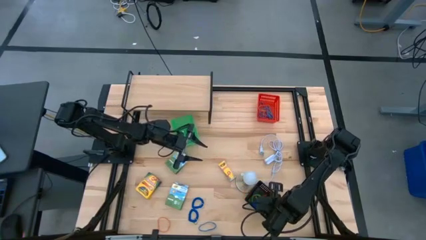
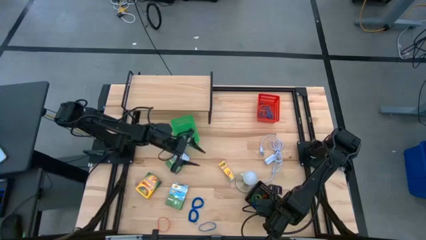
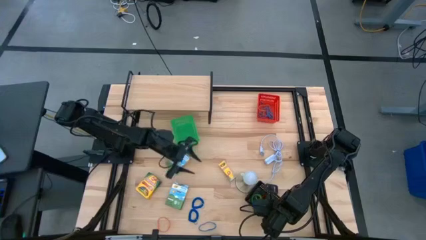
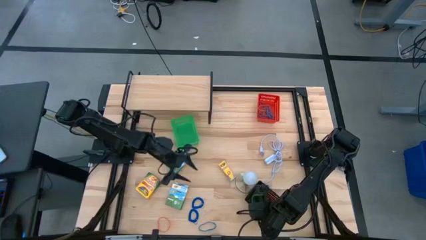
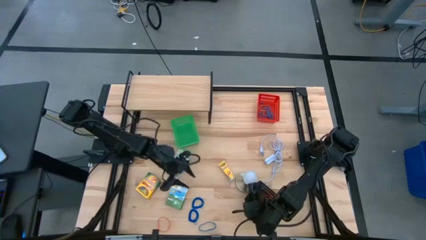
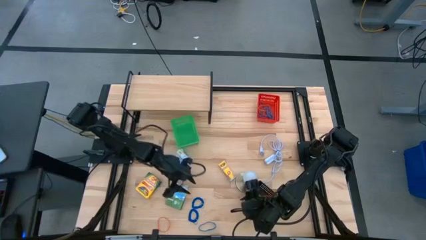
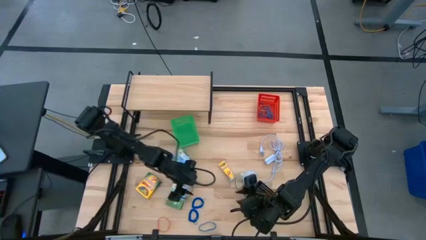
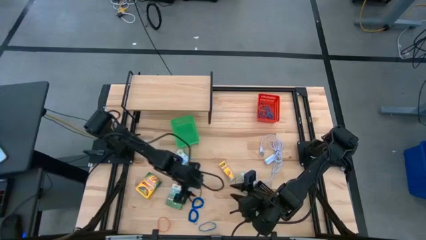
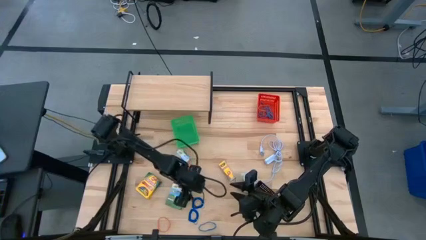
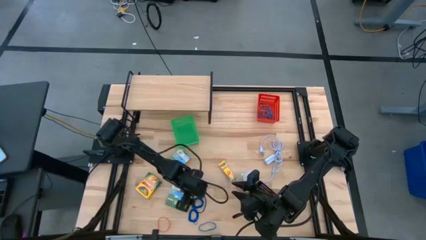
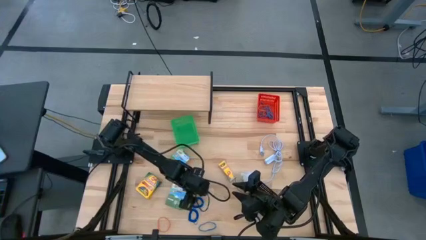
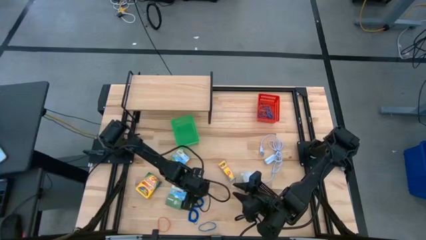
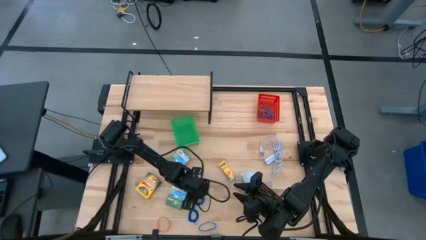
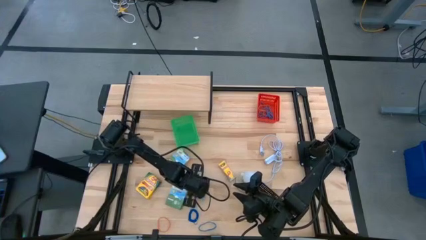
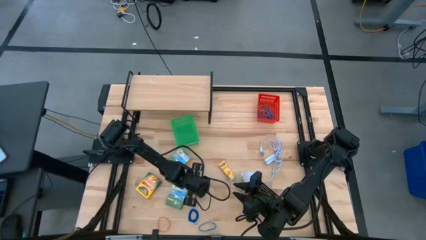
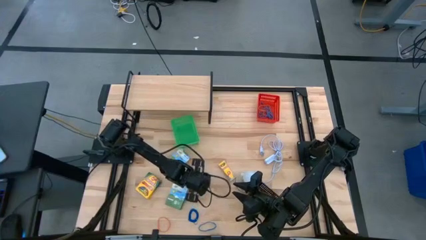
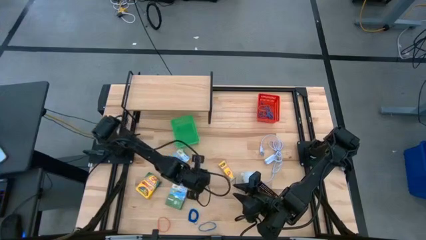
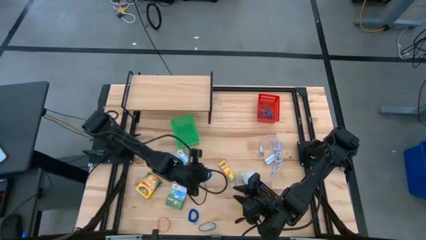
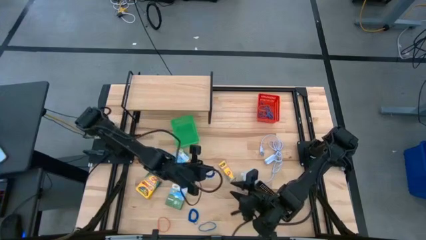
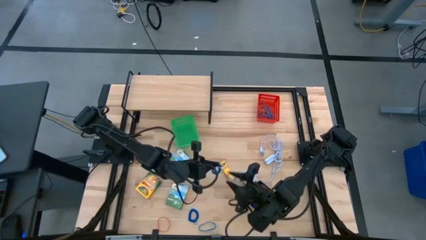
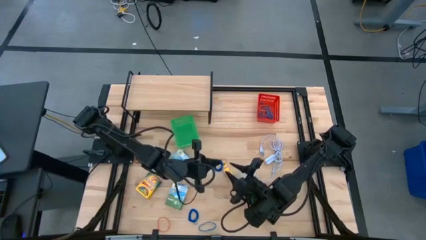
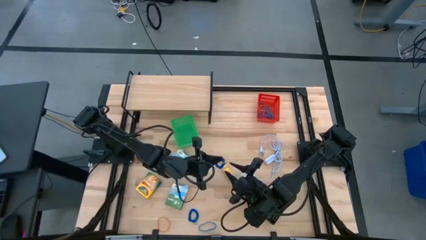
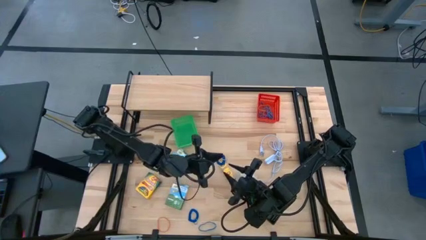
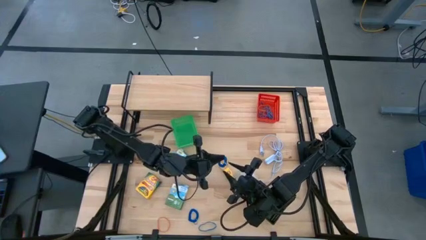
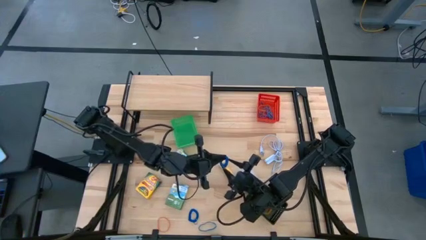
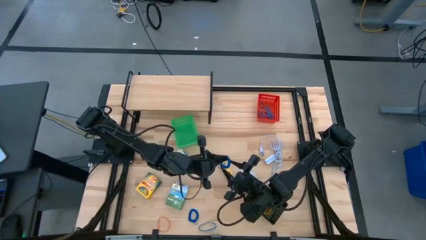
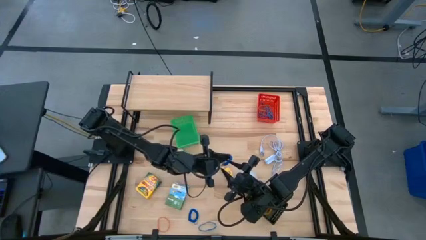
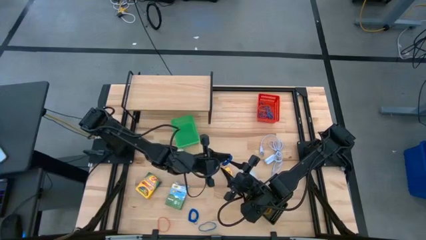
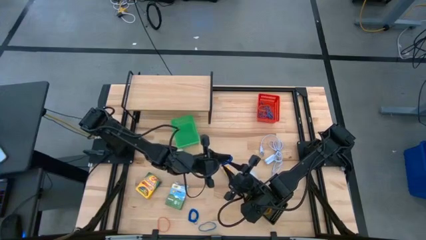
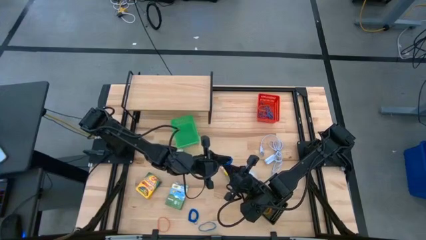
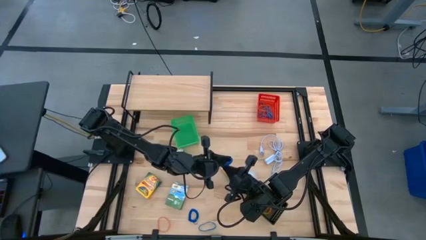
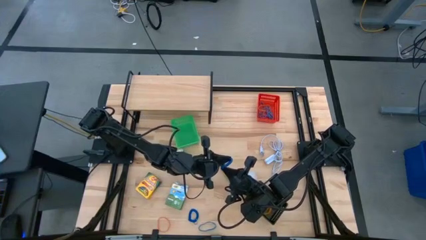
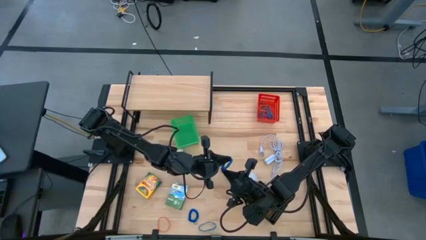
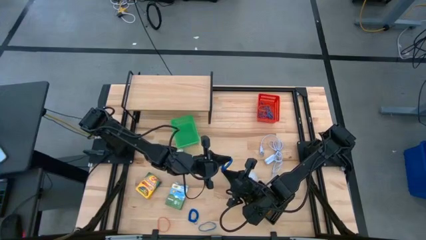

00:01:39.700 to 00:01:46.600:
Task: Pick & Place Office Desk Supplies
Put the blue spring keychain into the black basket

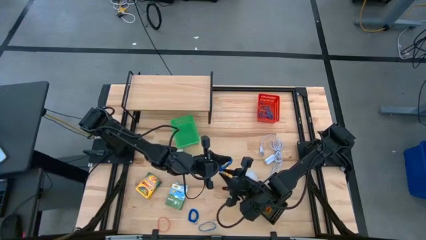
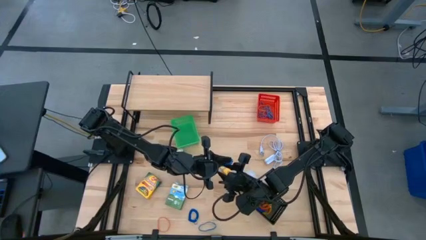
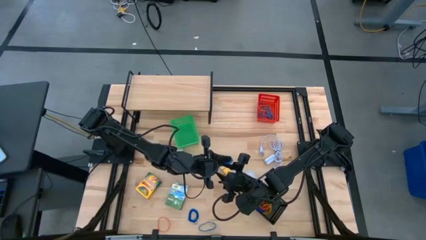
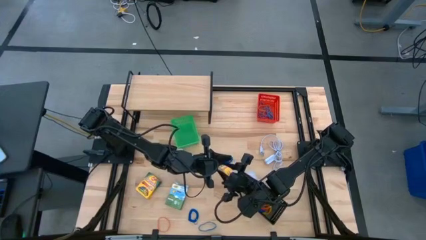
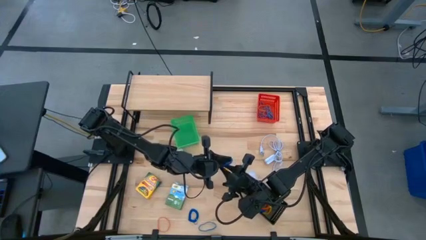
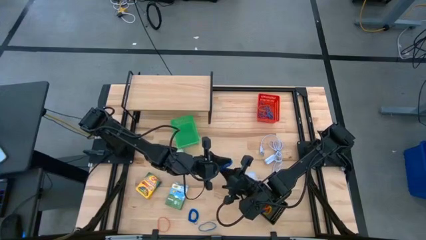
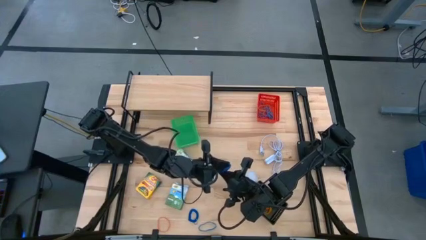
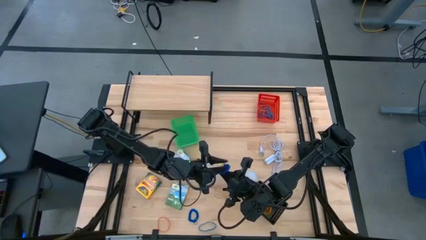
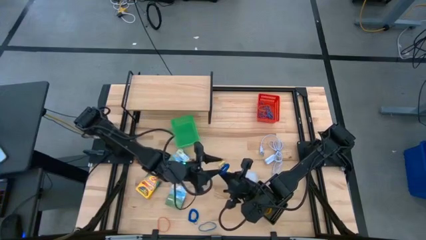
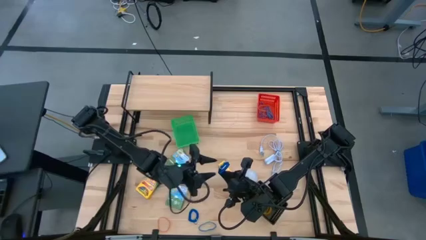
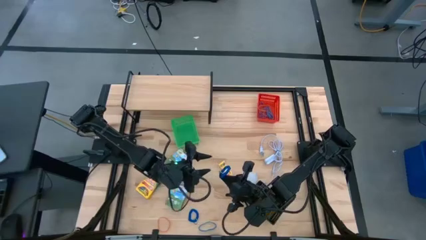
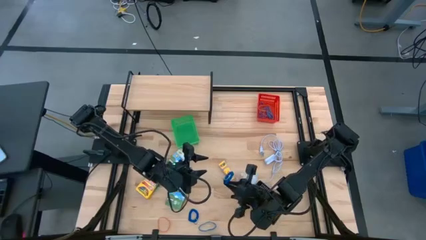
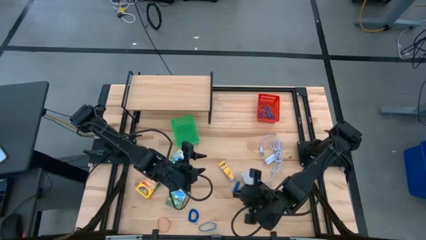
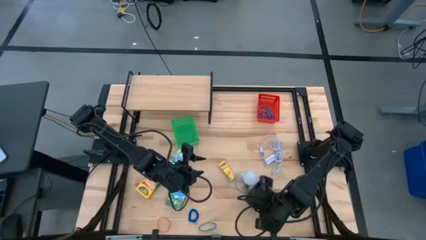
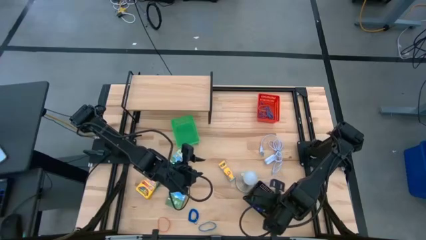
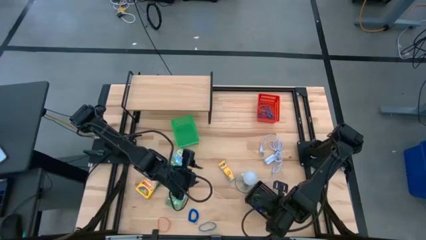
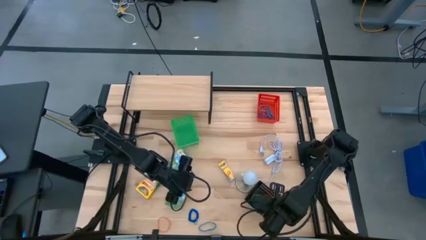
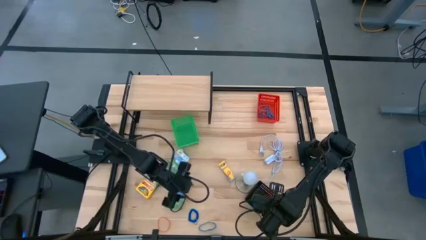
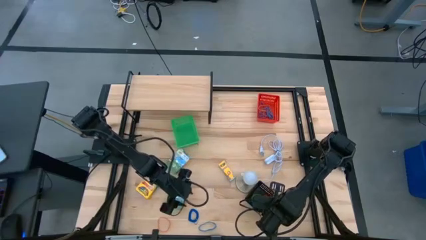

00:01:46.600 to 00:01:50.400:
Put the blue spring keychain into the black basket

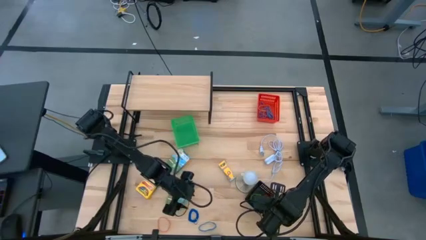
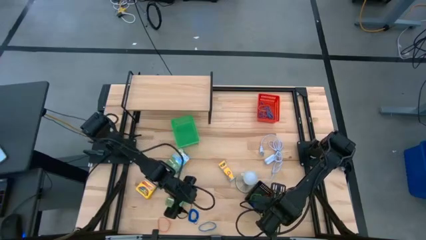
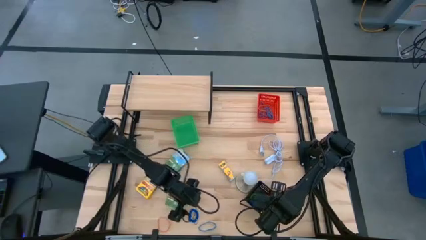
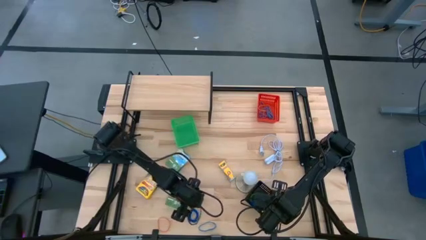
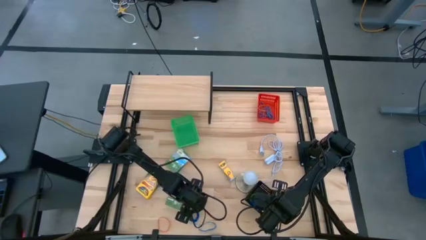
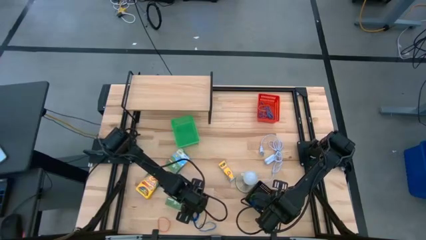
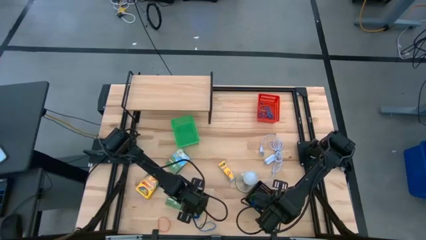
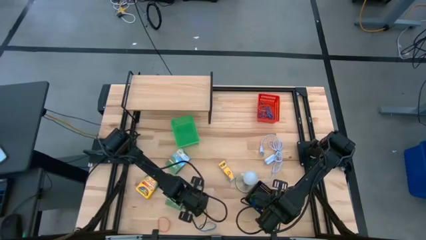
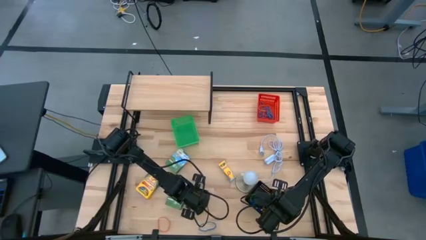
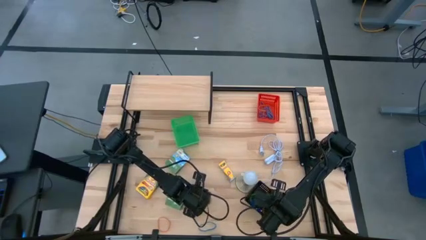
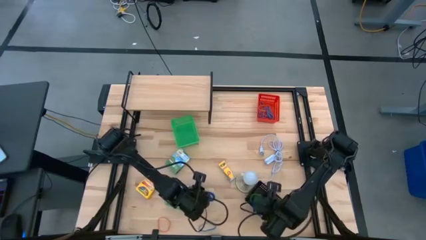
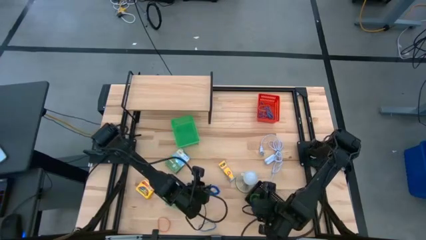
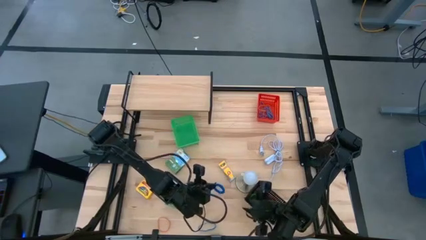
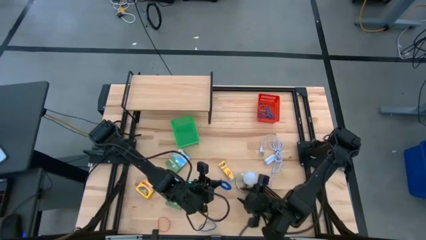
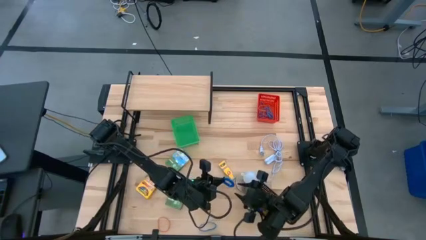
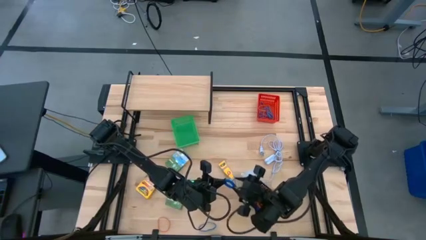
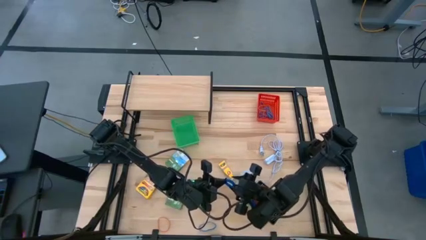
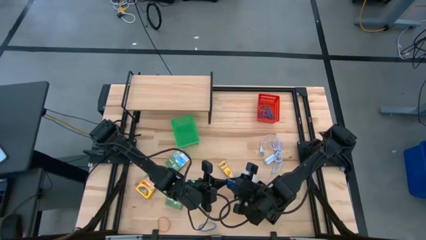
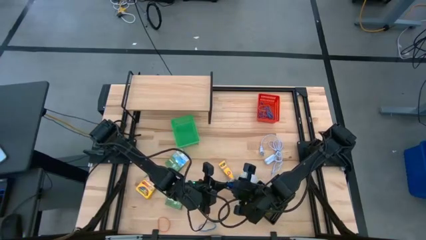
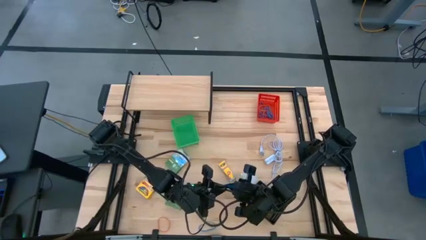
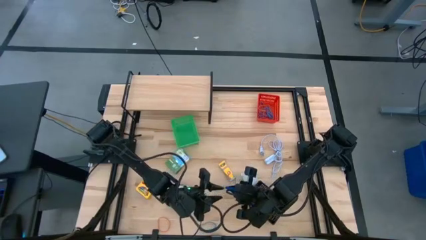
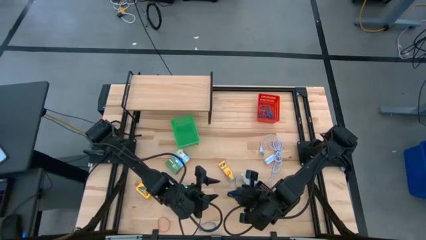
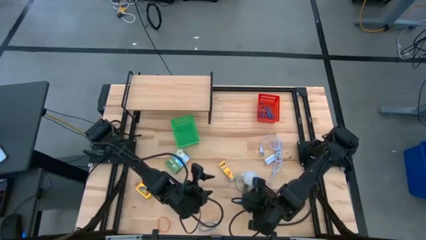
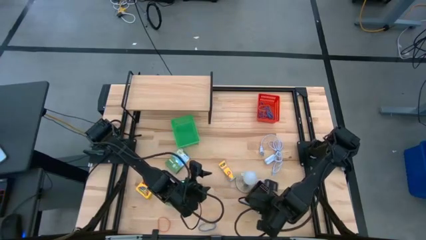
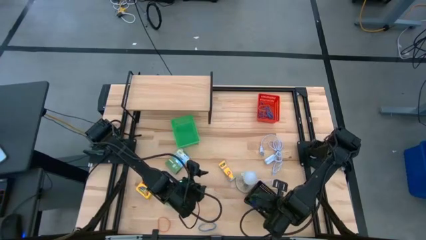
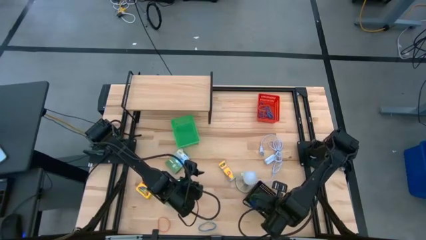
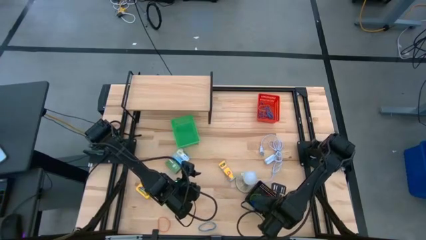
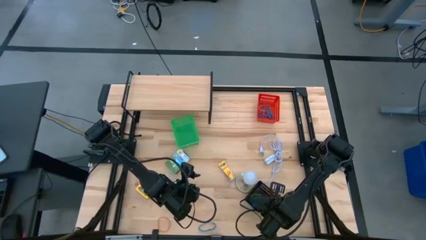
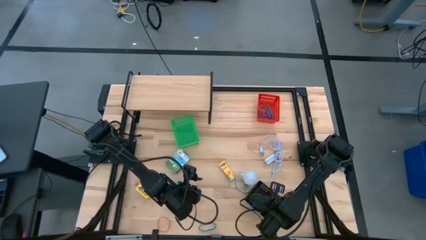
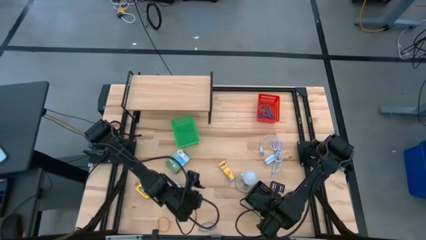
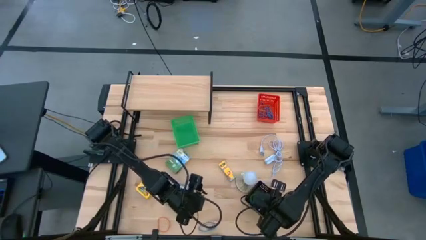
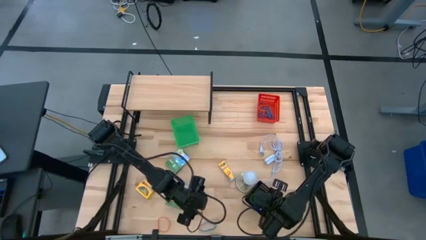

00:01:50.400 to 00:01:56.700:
Put the blue spring keychain into the black basket
